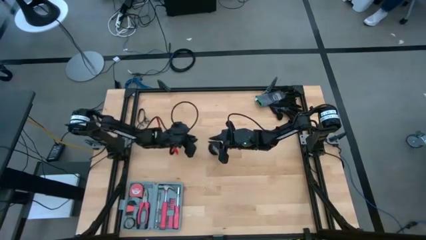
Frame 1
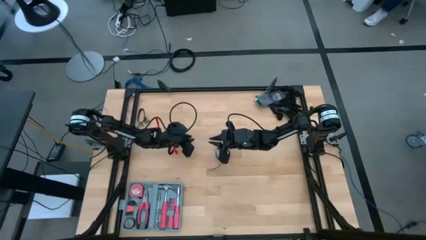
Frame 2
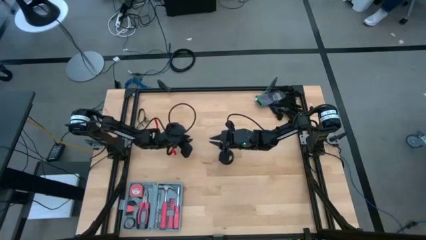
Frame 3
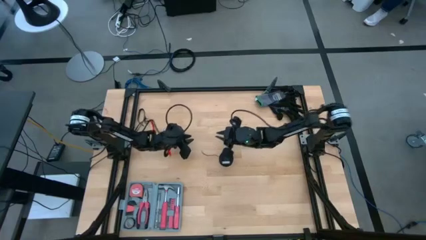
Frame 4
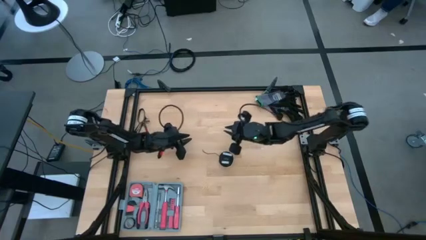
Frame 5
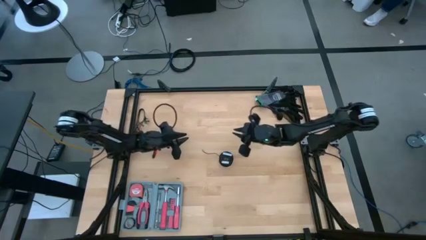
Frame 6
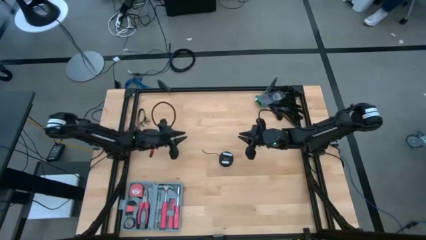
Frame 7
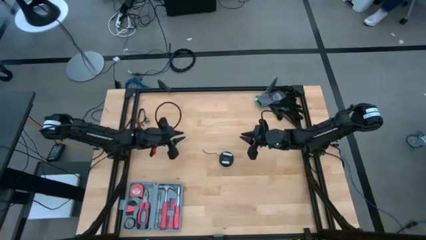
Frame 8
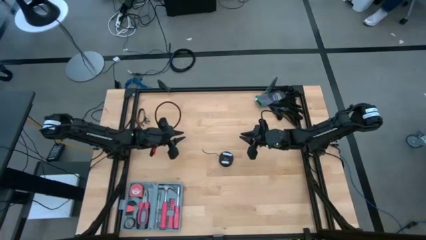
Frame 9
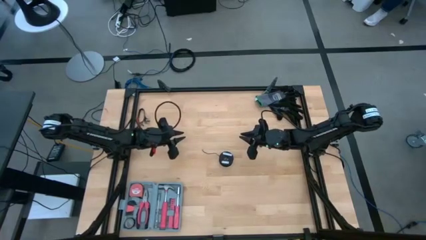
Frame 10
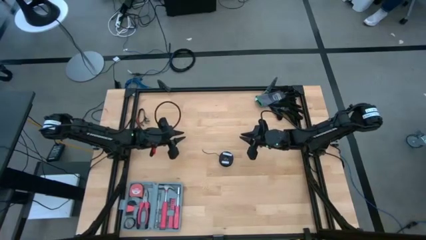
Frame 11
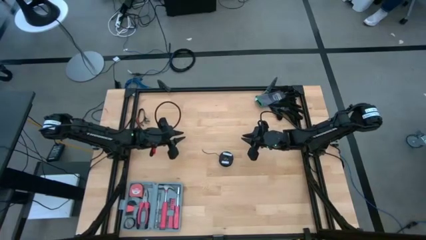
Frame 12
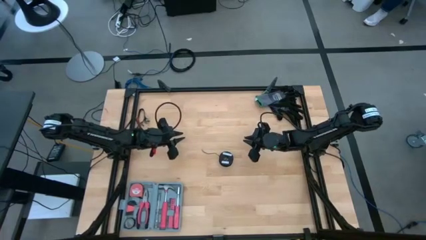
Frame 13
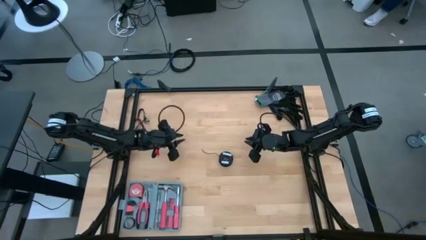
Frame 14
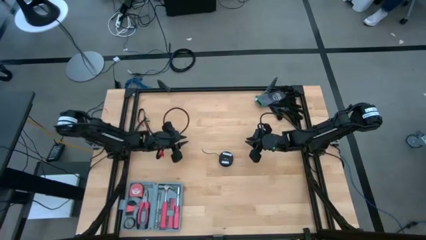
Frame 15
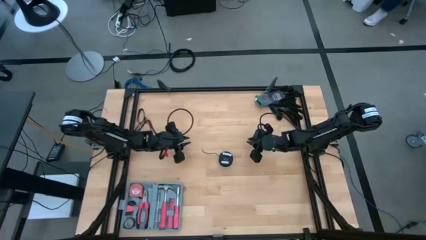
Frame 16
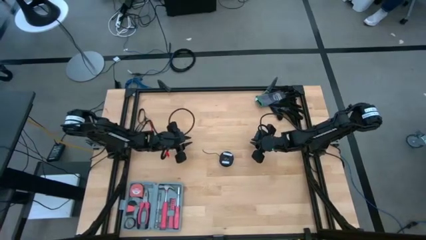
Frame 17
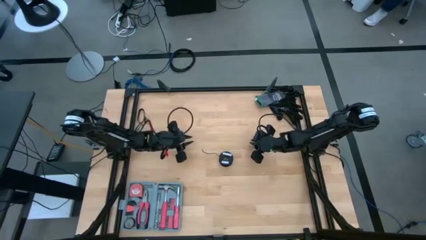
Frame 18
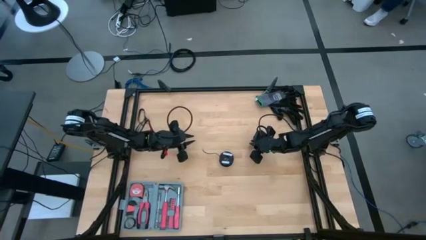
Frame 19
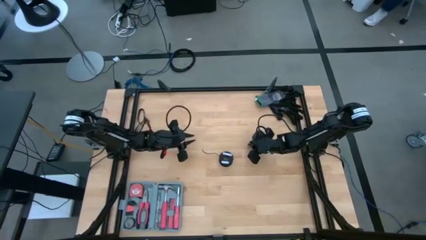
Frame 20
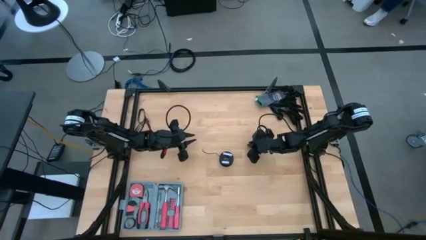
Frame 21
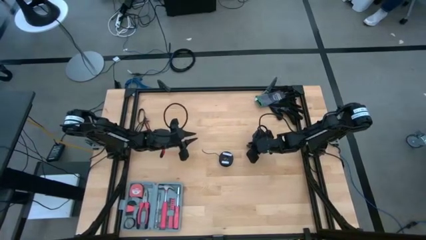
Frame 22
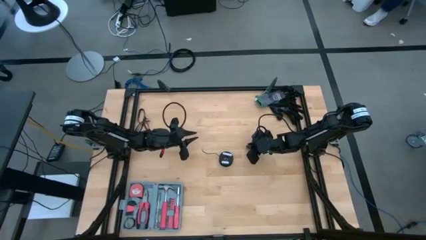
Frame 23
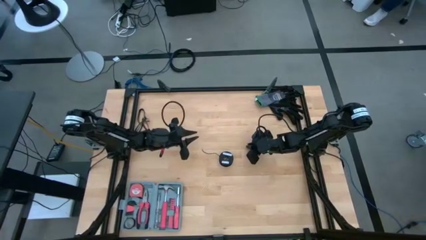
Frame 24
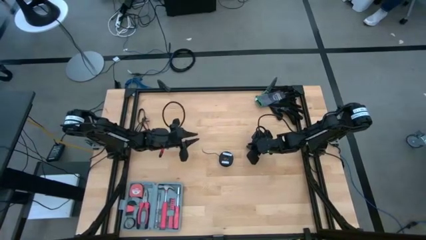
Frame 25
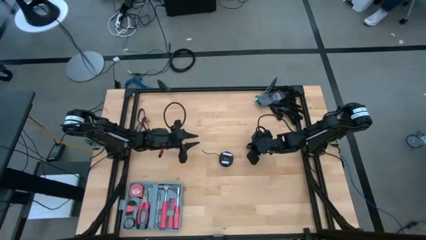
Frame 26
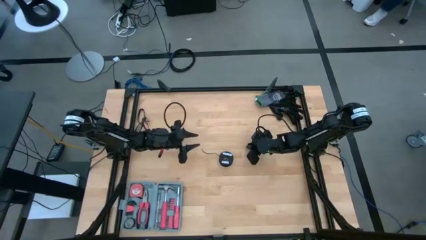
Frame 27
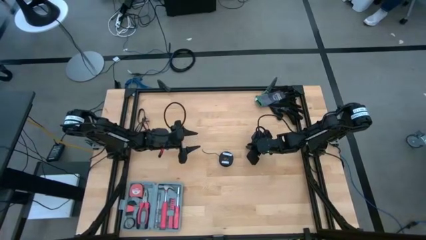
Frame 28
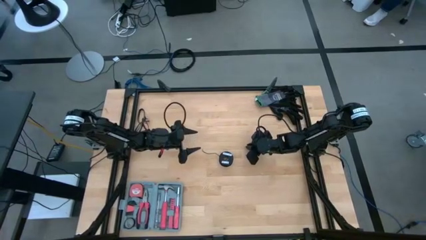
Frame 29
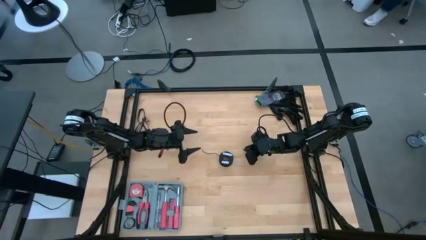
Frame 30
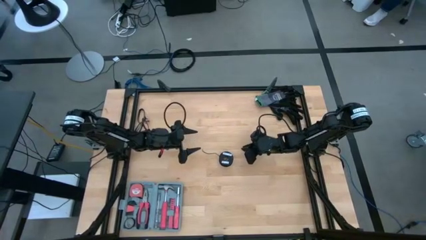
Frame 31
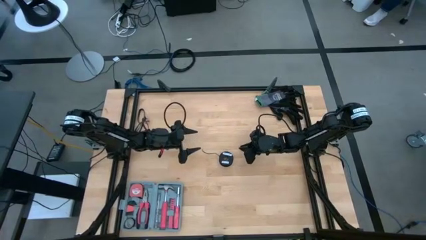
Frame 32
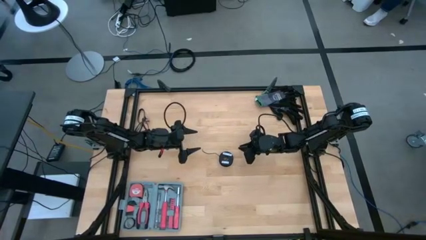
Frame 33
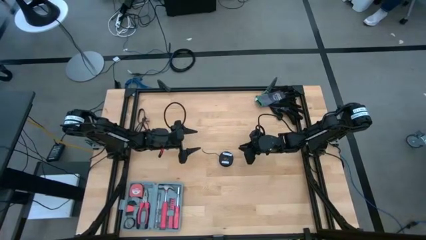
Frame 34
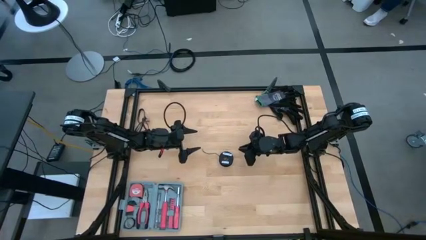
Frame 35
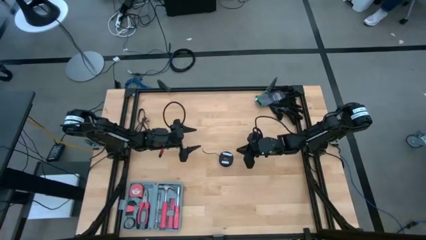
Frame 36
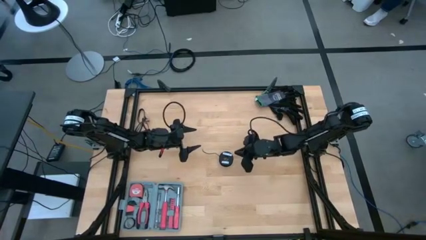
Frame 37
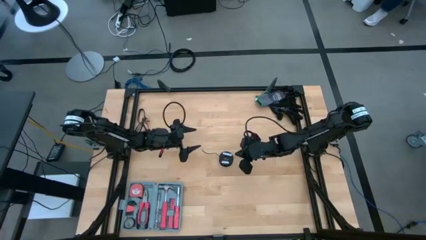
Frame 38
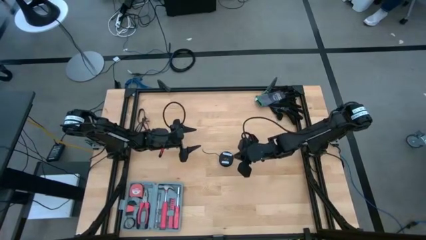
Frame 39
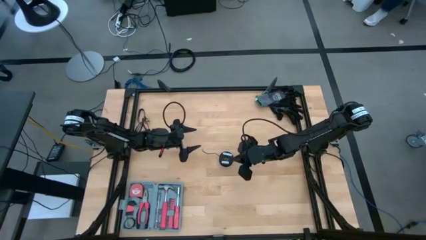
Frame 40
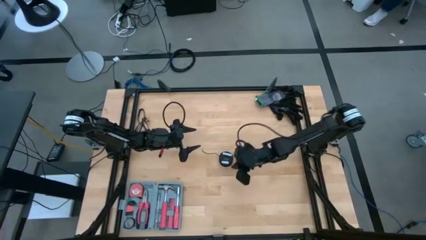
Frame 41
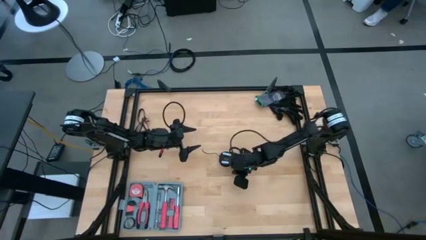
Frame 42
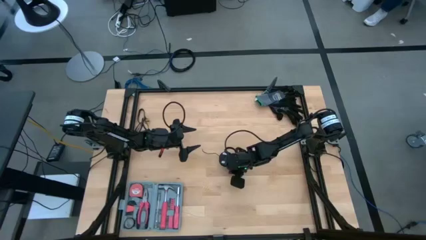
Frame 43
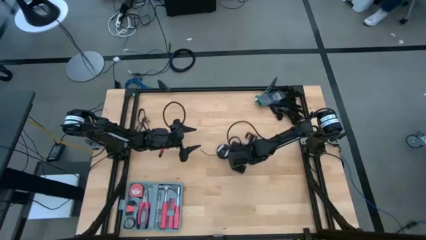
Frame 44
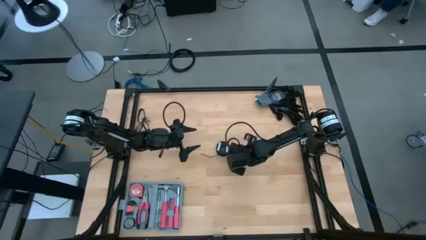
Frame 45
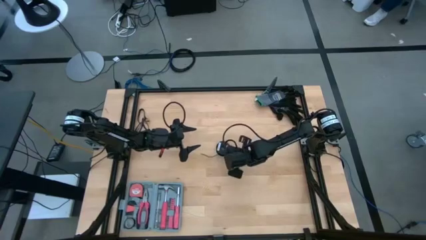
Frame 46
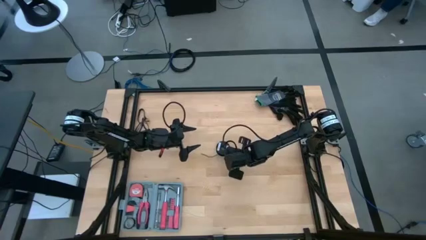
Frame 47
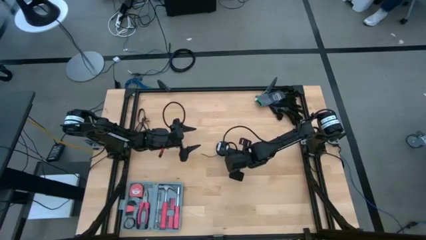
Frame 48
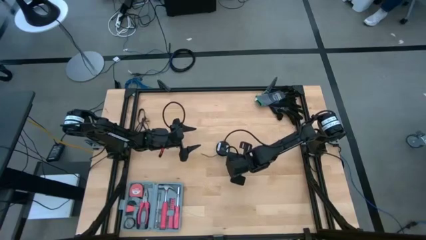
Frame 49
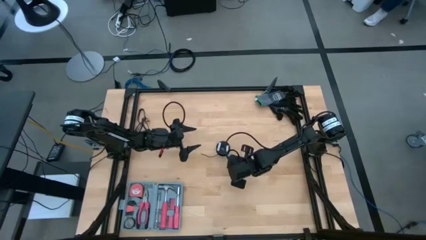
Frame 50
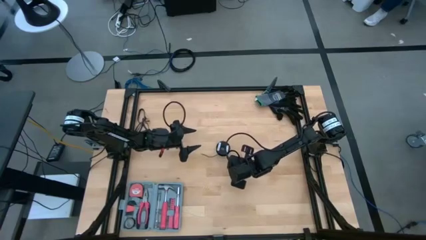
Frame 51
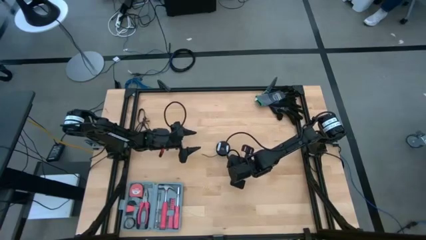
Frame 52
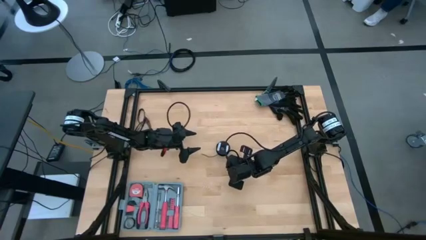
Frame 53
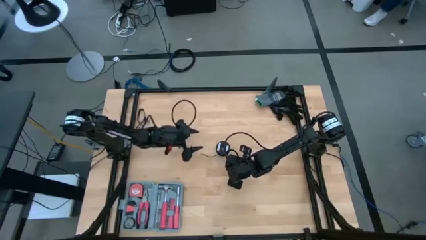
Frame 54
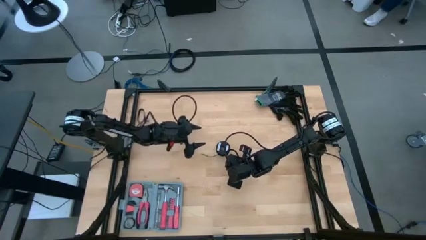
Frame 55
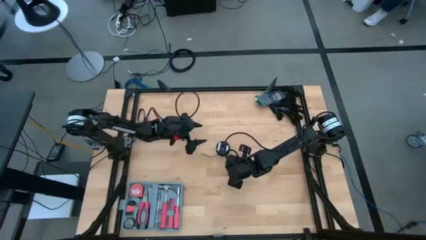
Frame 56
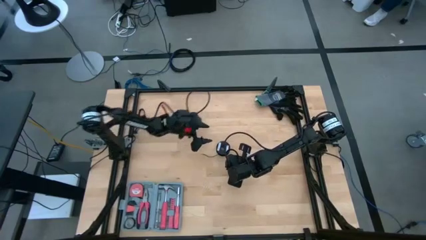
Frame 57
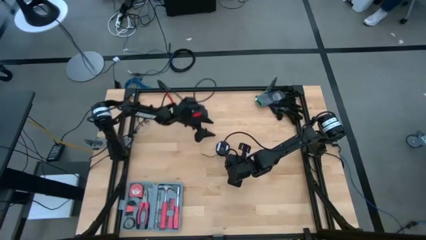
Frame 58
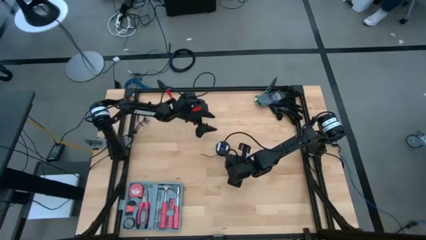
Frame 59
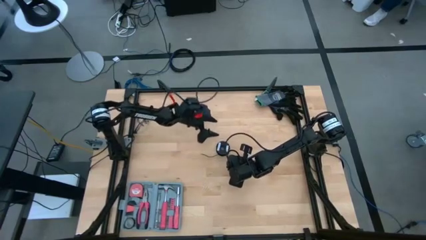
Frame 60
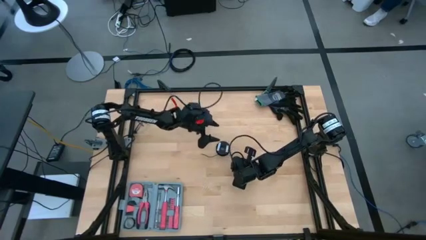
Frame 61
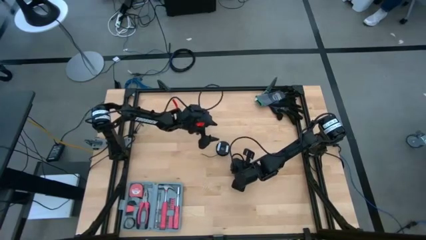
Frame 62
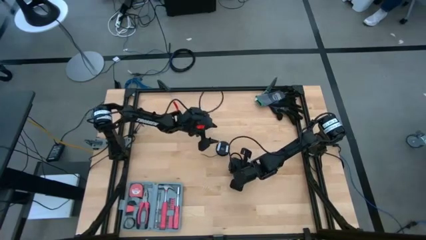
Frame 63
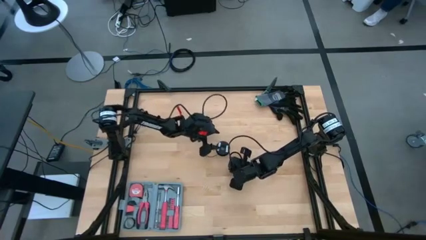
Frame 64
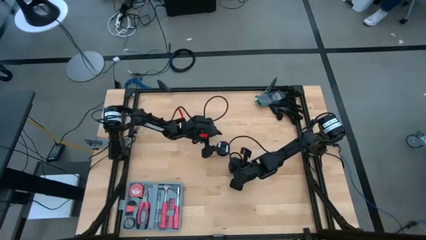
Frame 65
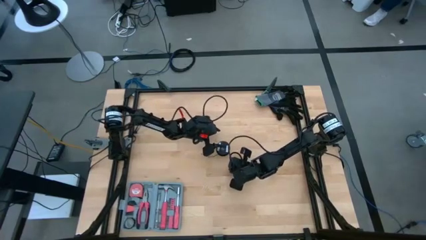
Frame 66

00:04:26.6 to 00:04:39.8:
Task: Coil cords
Uncoil the black wire from the spool
